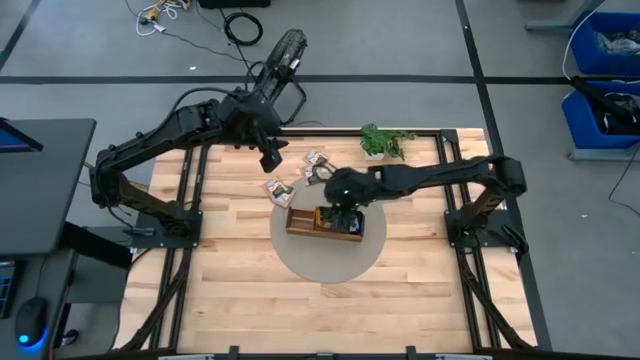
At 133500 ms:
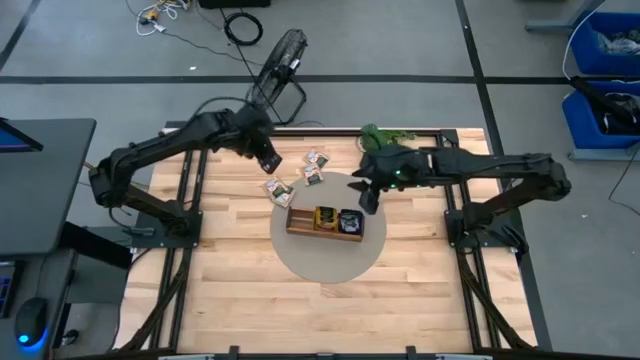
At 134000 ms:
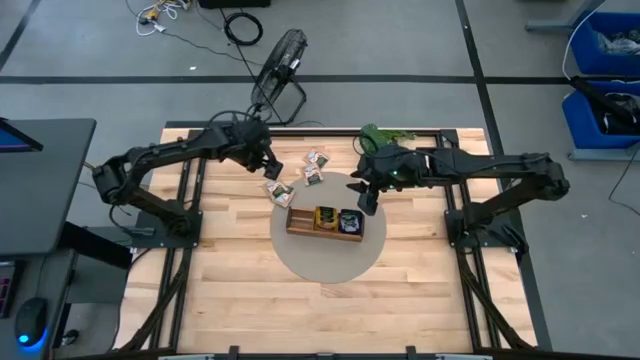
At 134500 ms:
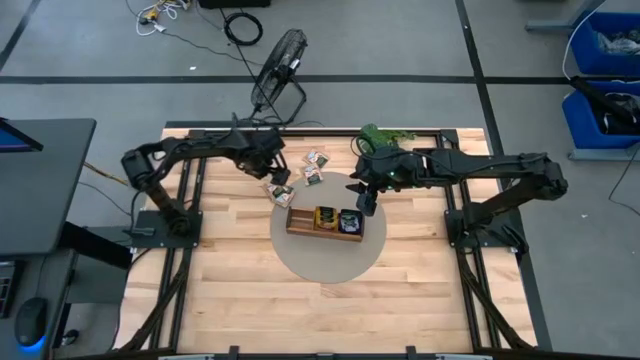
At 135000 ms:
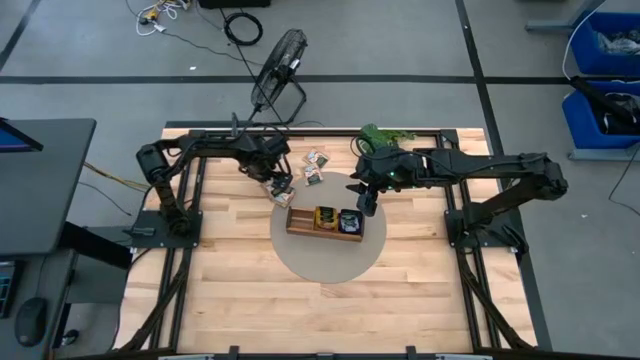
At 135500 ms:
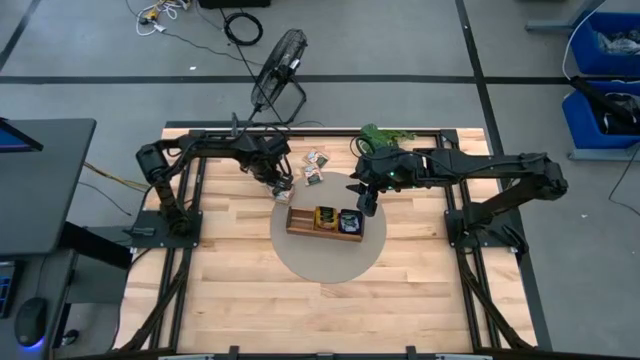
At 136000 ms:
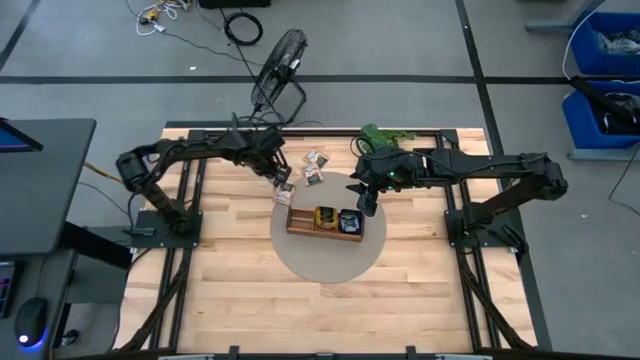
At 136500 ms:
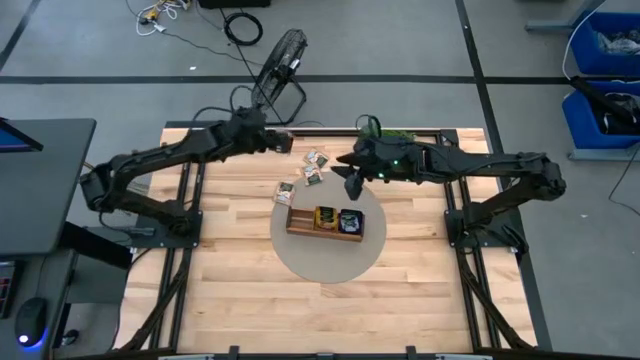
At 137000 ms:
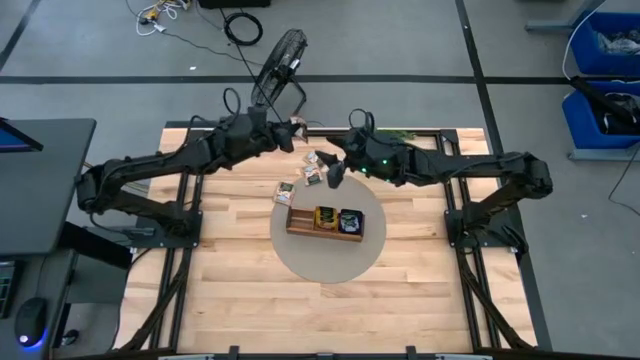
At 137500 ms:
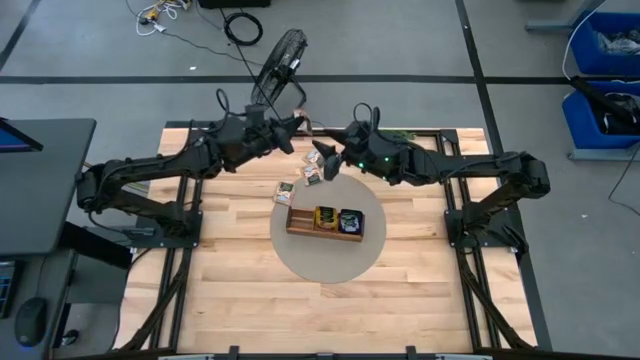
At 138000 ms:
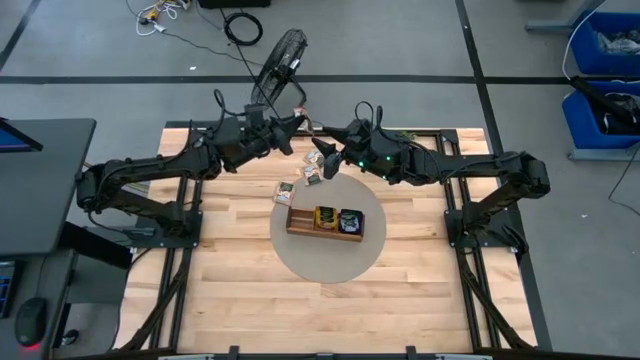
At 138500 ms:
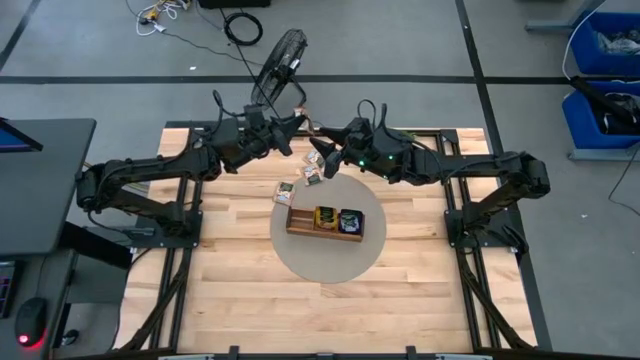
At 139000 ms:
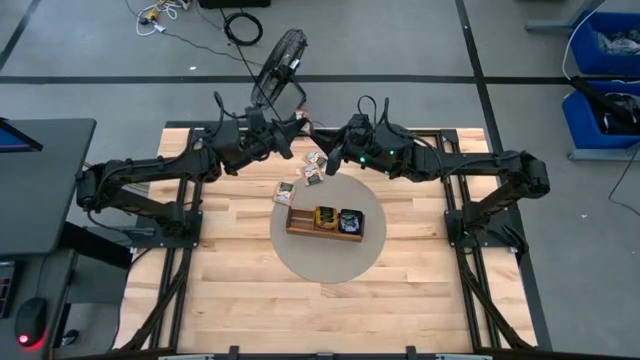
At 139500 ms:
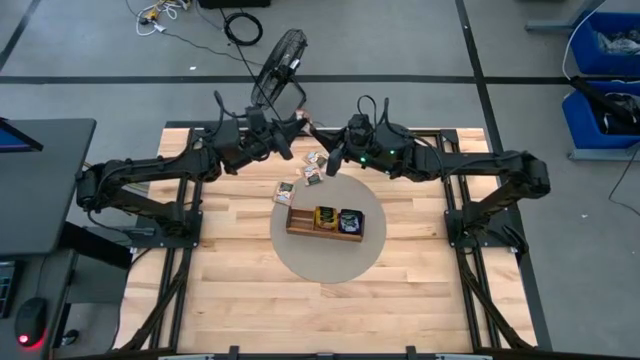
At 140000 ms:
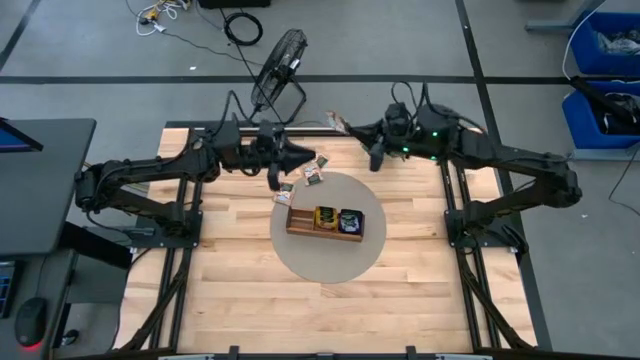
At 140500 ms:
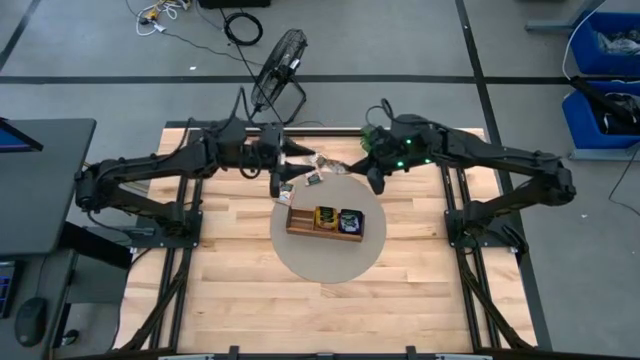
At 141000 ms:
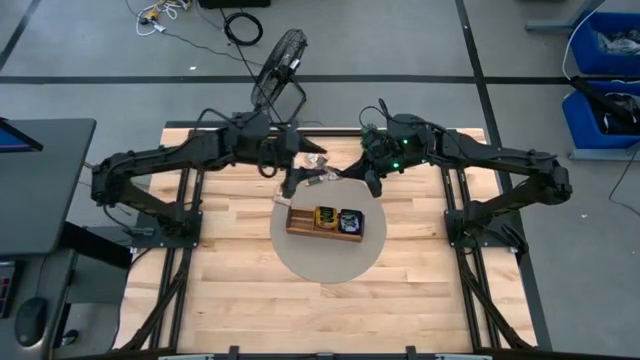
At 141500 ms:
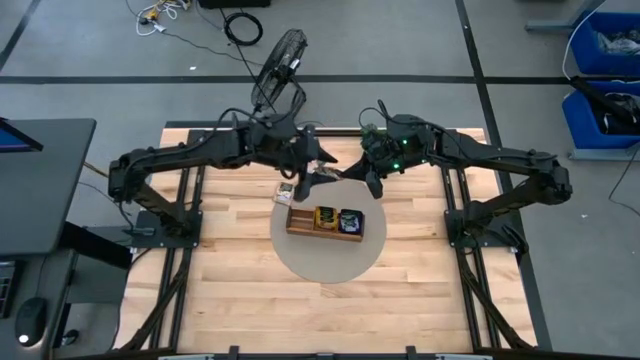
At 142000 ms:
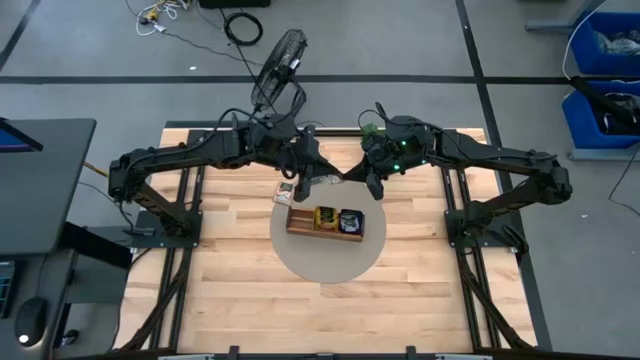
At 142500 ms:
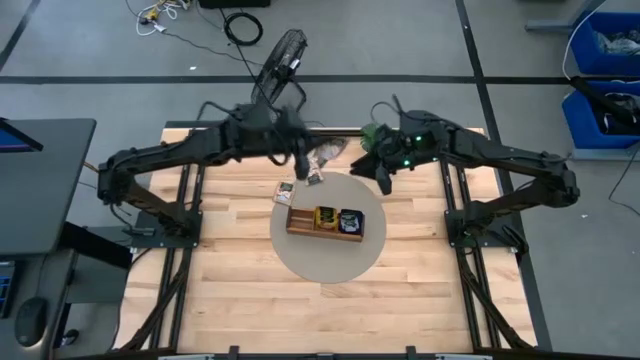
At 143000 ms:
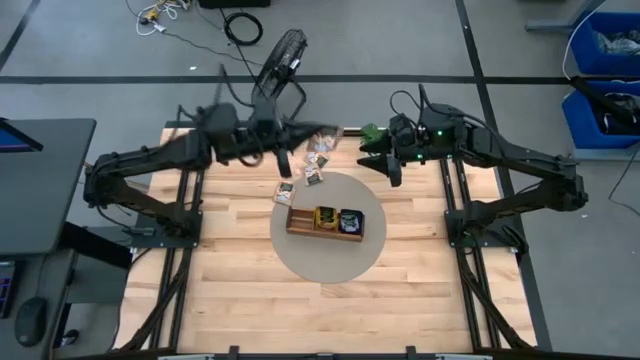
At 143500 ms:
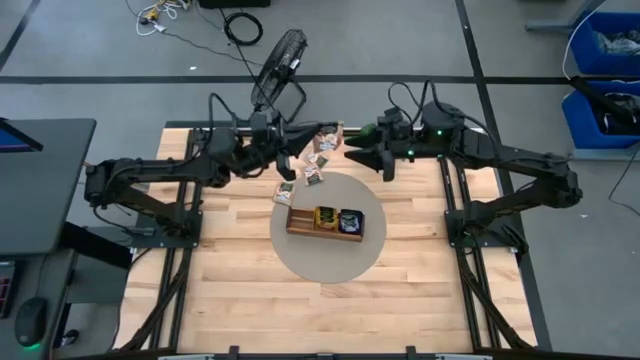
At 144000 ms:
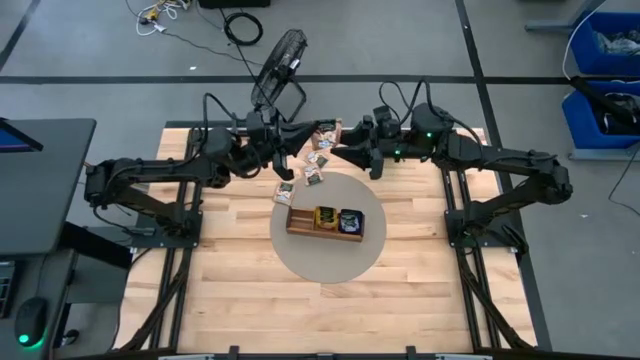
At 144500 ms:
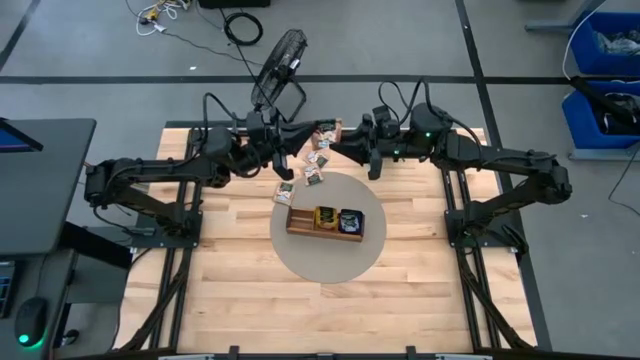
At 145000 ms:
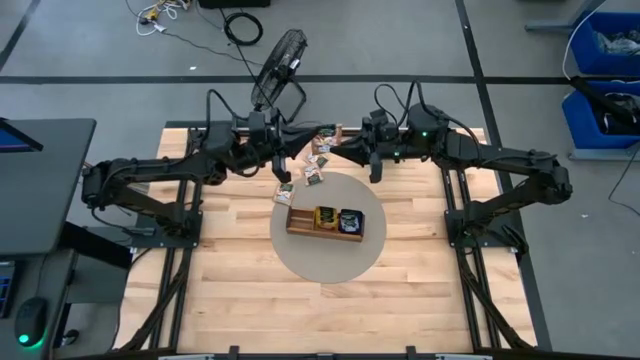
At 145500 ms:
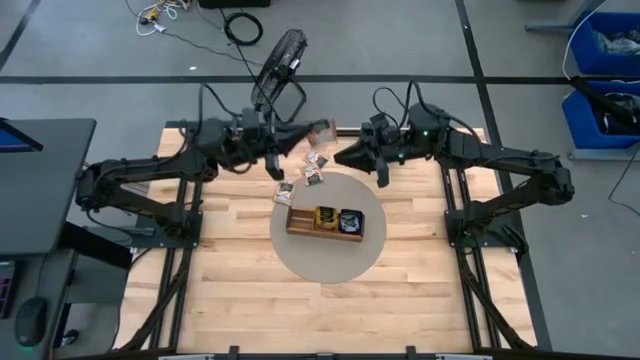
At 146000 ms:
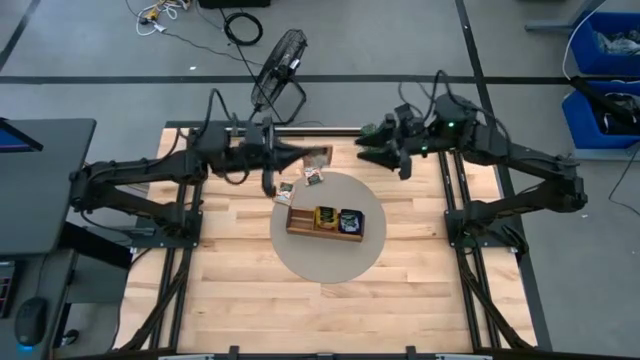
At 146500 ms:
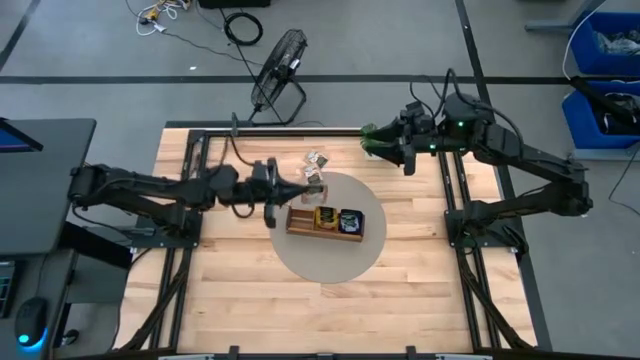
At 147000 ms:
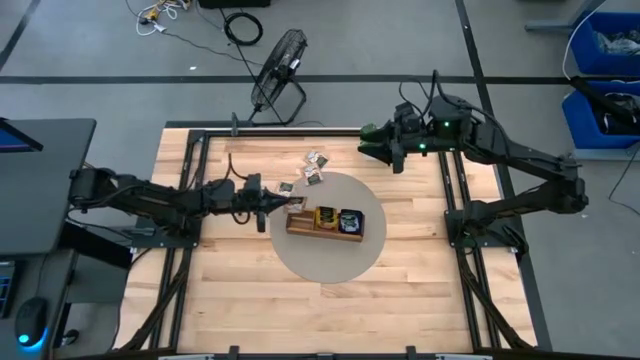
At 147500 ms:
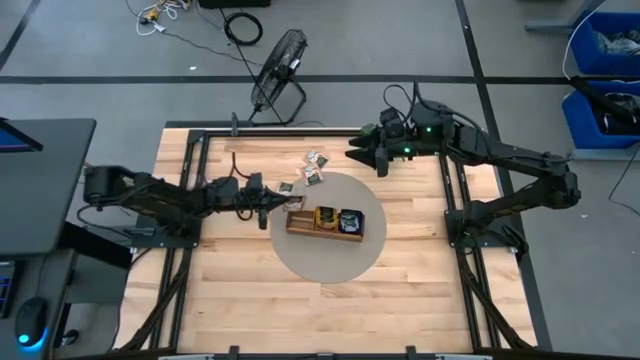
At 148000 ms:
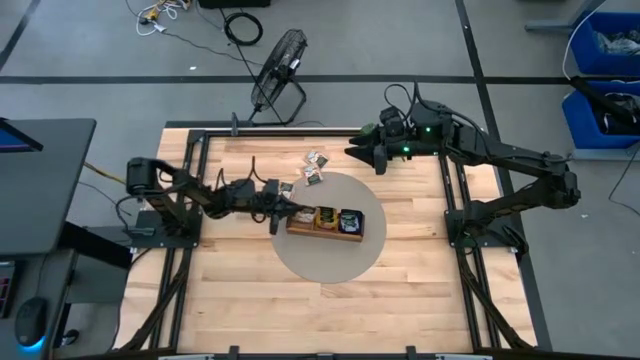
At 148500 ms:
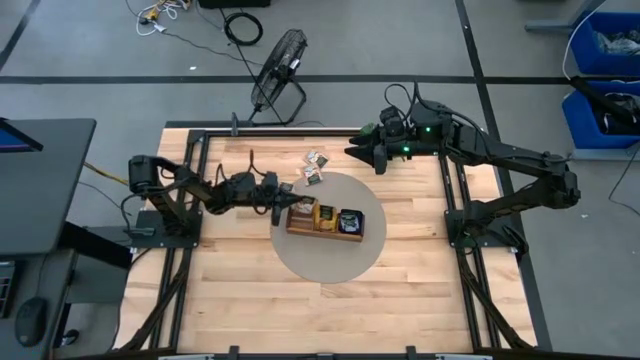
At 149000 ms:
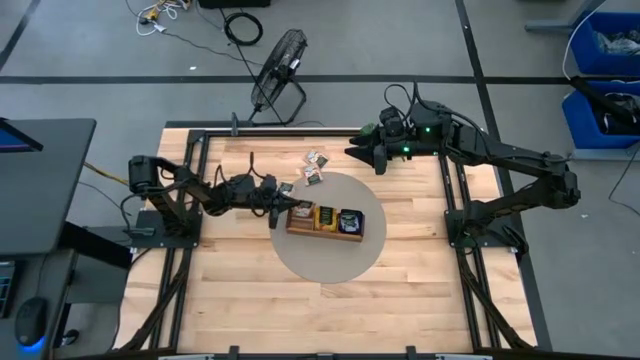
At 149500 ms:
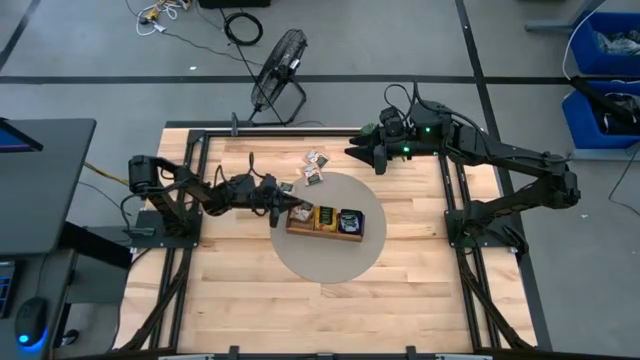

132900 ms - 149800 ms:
Task: Pick & Place Tea
Put the brown tea bag into the left section of the wooden organizer

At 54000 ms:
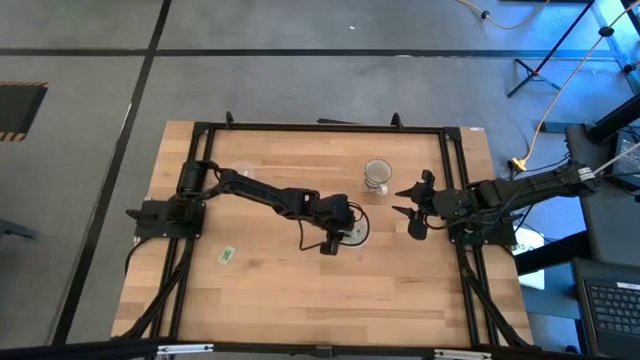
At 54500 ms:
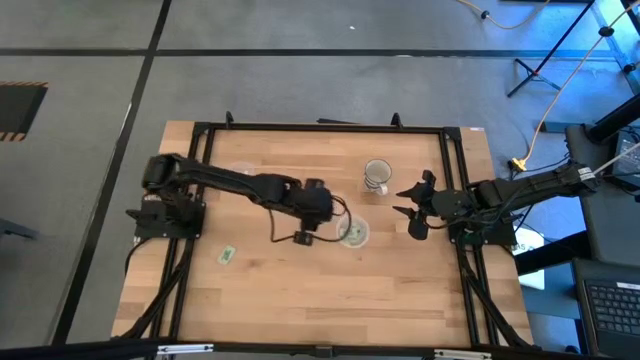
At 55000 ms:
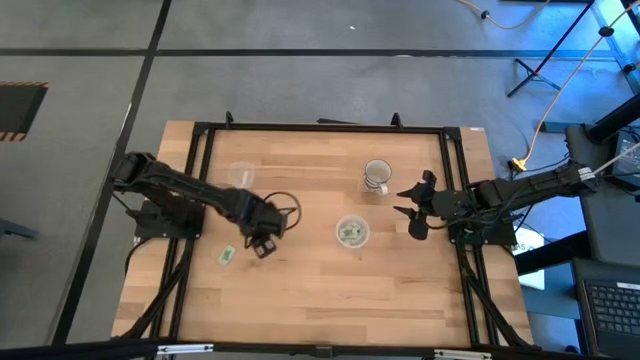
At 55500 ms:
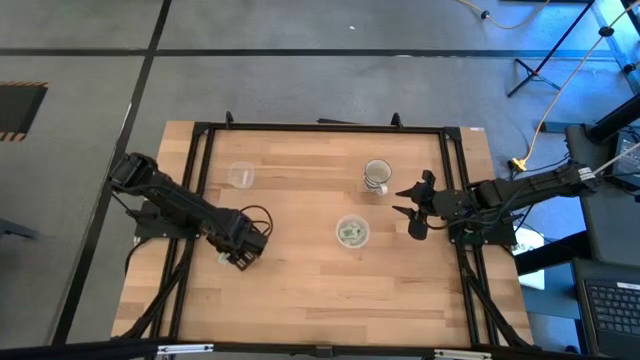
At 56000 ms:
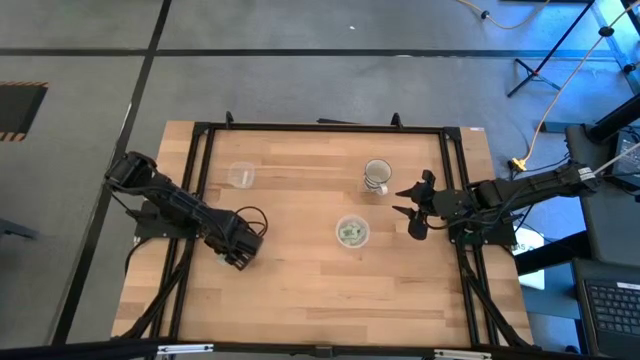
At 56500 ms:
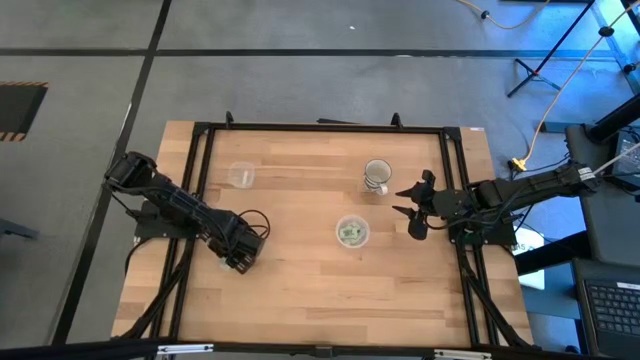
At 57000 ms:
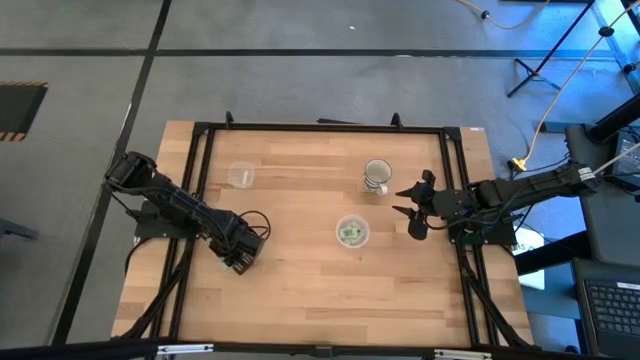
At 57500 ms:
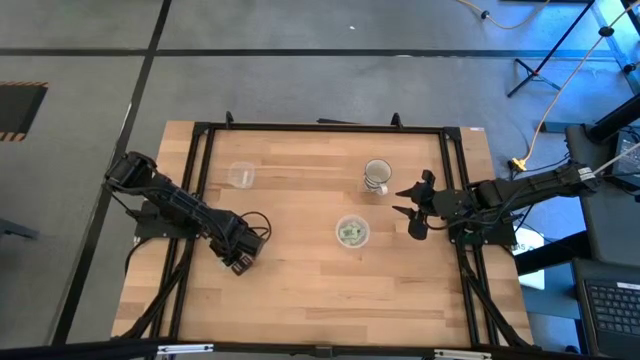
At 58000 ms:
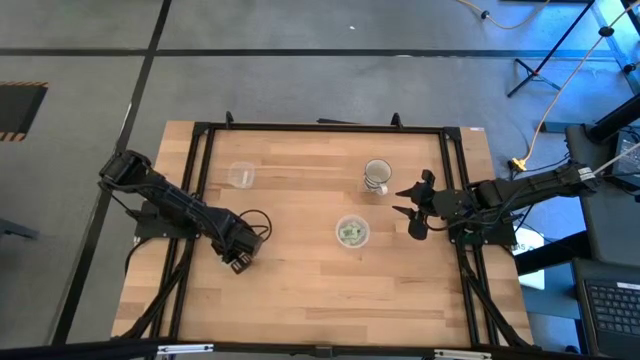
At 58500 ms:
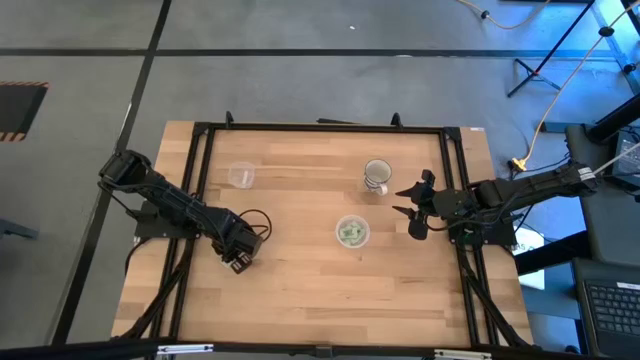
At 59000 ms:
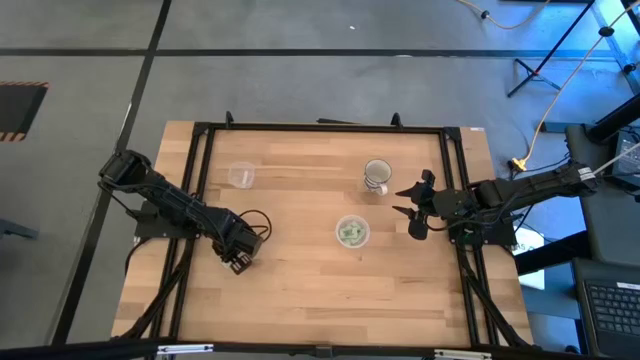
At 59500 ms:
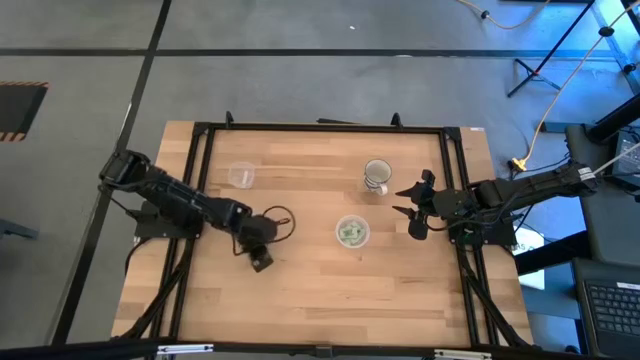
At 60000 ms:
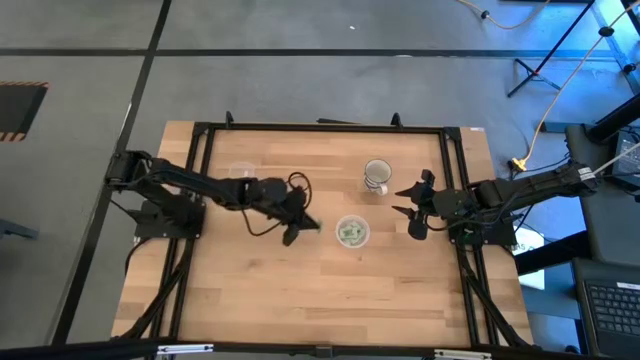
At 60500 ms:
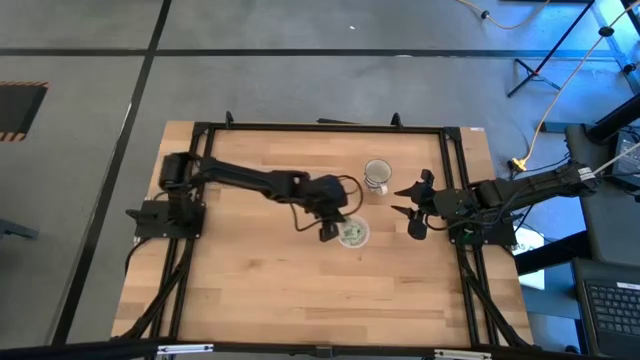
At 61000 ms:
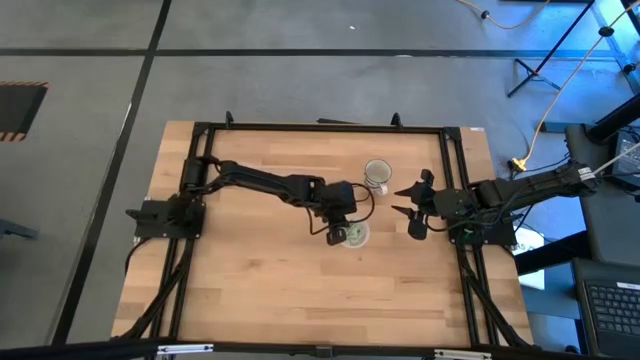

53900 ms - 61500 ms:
Task: Pick and place Stevia / Truvia into bins
Put the green stevia packet into the circular transparent container
